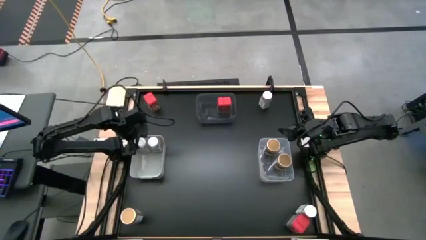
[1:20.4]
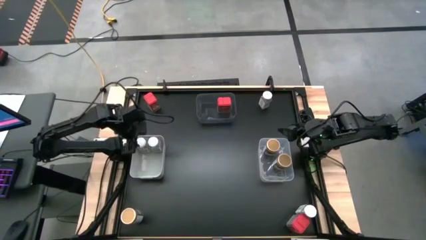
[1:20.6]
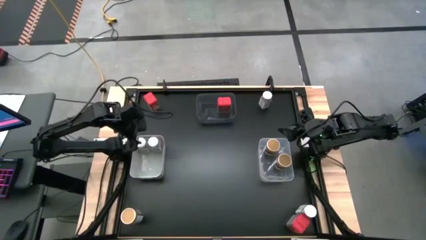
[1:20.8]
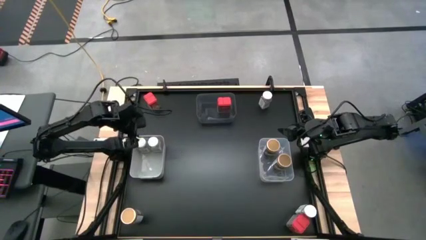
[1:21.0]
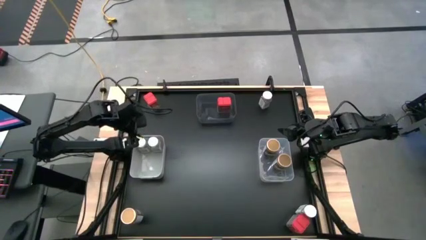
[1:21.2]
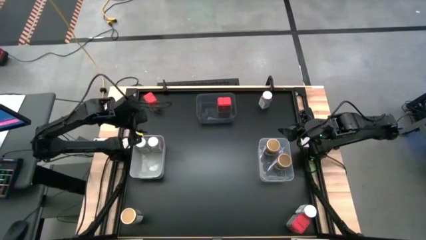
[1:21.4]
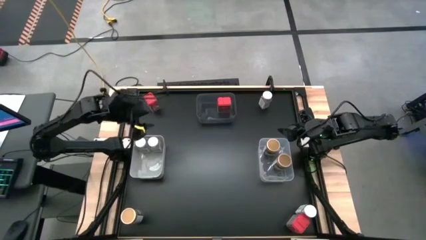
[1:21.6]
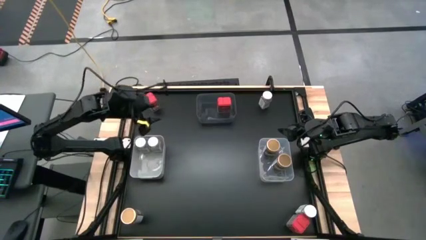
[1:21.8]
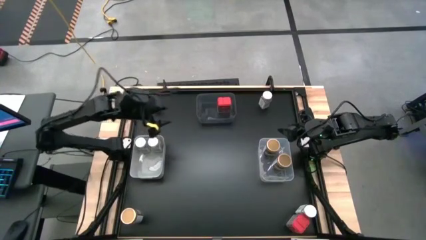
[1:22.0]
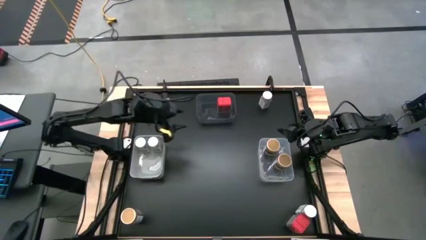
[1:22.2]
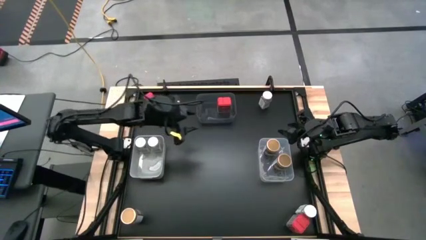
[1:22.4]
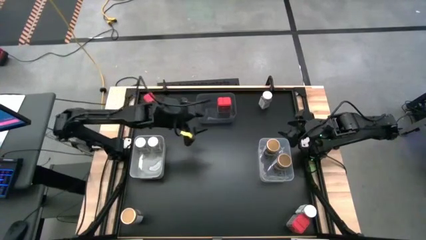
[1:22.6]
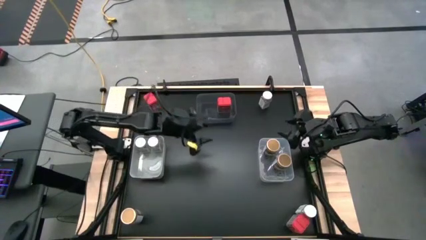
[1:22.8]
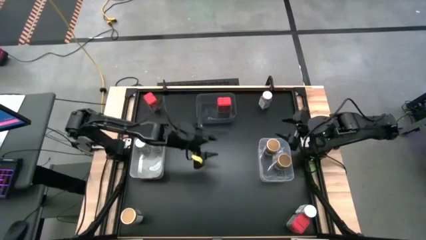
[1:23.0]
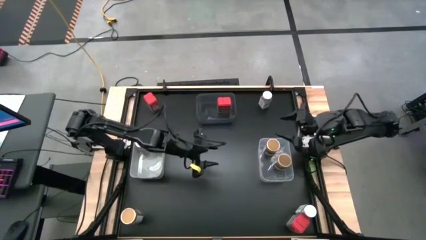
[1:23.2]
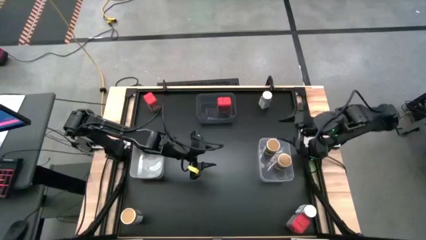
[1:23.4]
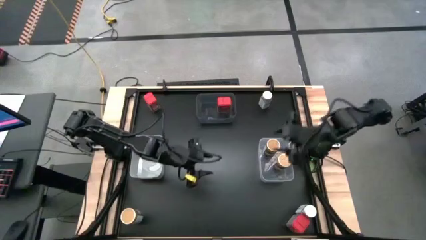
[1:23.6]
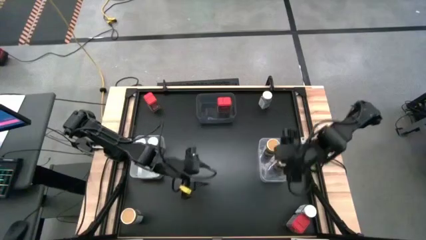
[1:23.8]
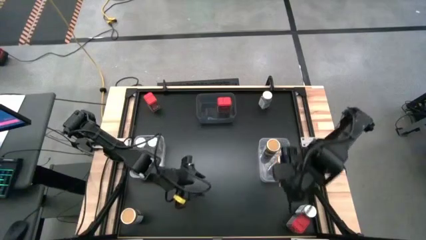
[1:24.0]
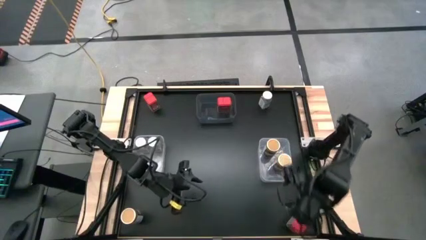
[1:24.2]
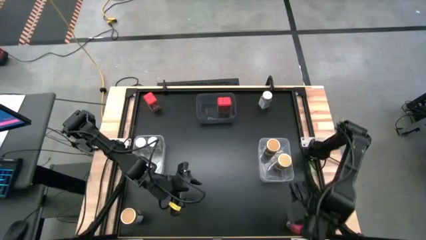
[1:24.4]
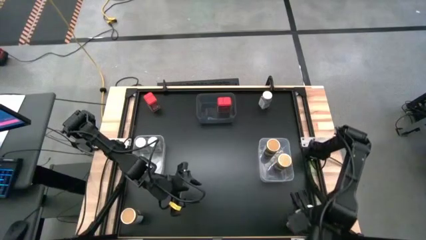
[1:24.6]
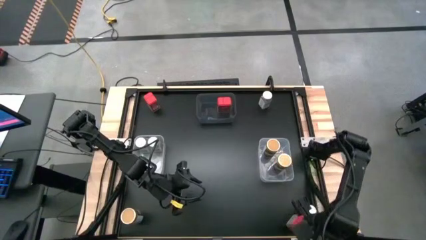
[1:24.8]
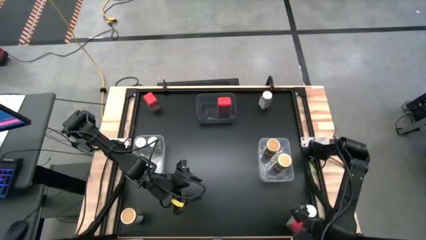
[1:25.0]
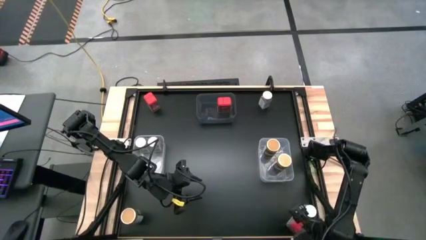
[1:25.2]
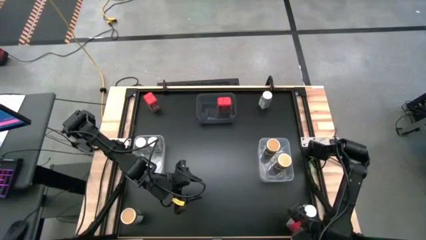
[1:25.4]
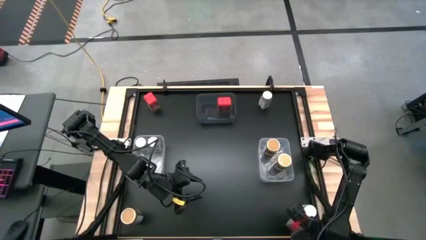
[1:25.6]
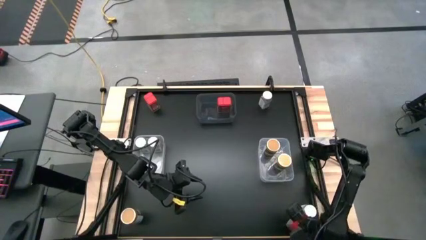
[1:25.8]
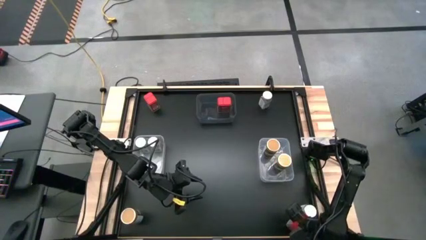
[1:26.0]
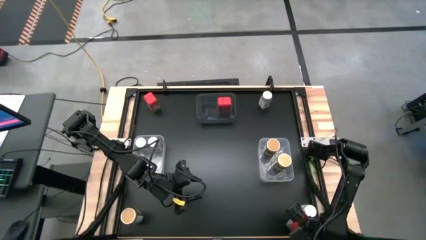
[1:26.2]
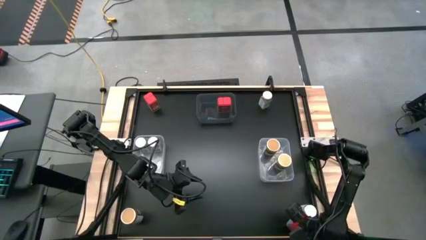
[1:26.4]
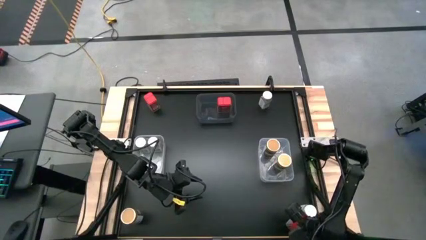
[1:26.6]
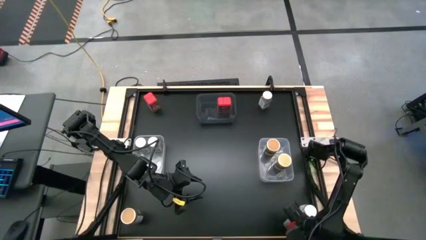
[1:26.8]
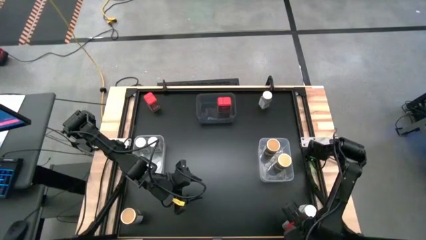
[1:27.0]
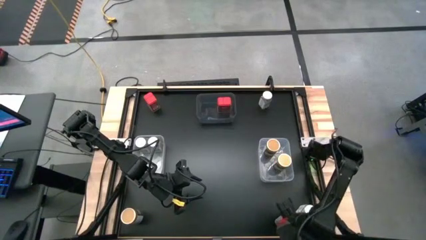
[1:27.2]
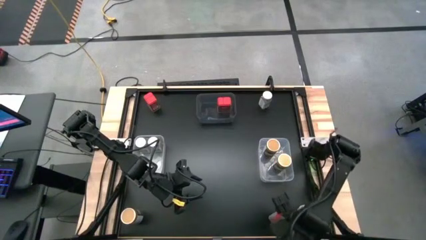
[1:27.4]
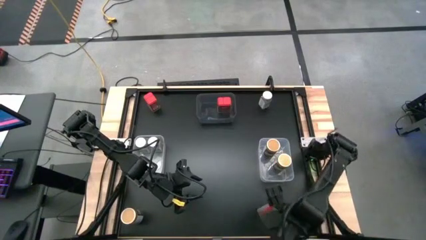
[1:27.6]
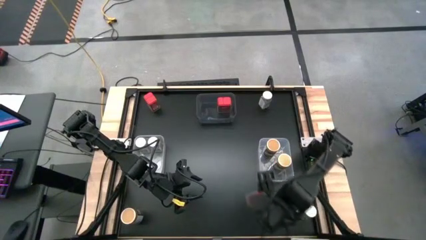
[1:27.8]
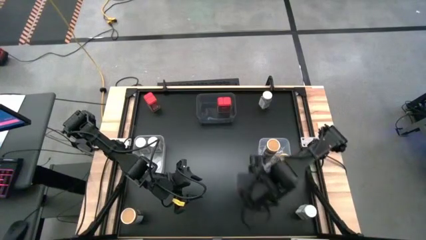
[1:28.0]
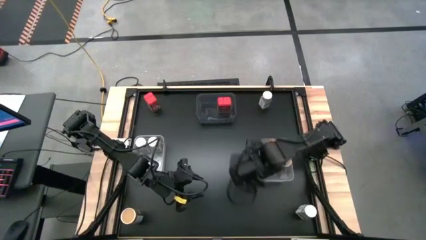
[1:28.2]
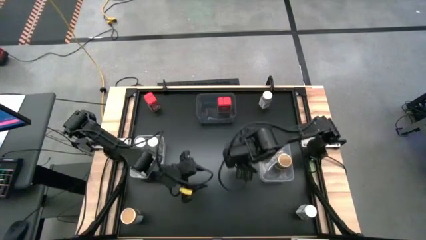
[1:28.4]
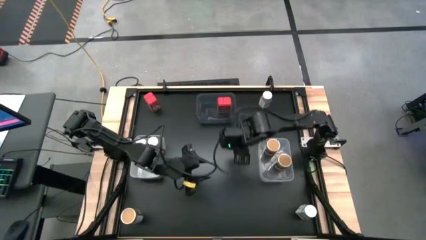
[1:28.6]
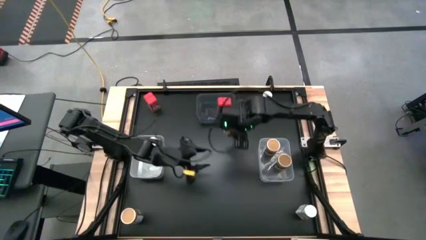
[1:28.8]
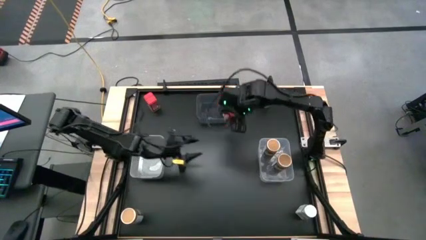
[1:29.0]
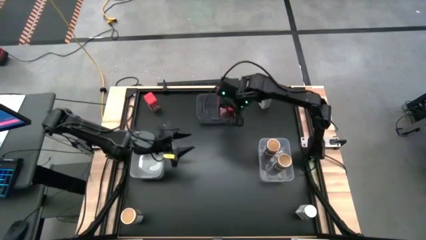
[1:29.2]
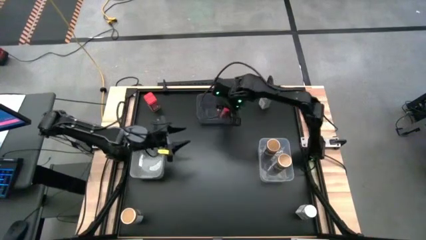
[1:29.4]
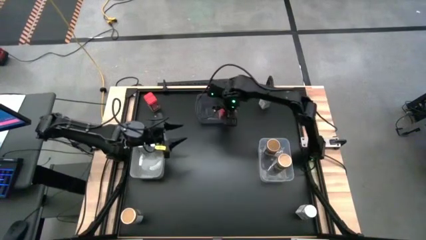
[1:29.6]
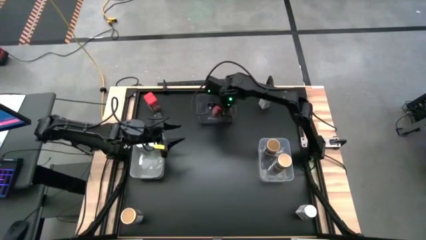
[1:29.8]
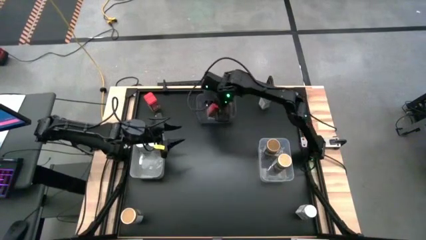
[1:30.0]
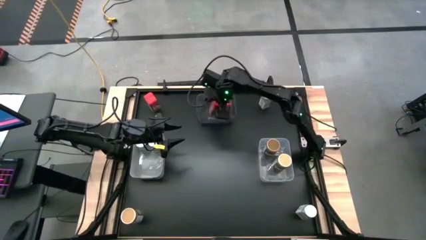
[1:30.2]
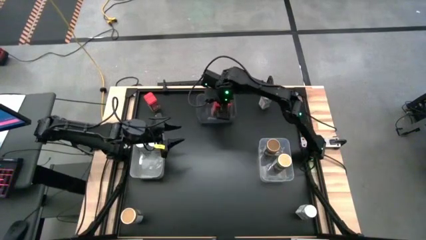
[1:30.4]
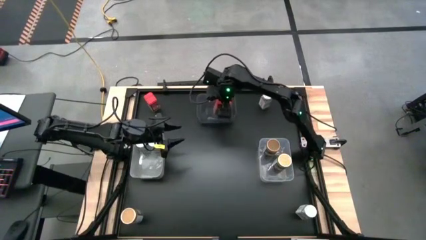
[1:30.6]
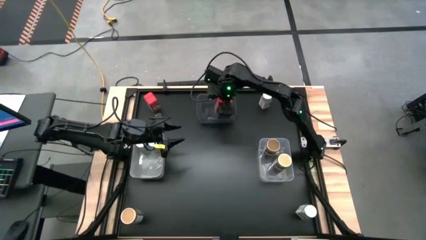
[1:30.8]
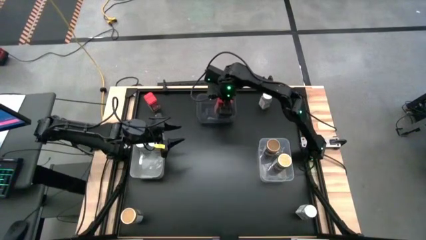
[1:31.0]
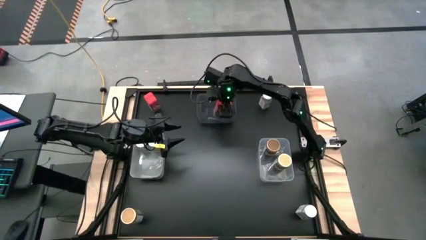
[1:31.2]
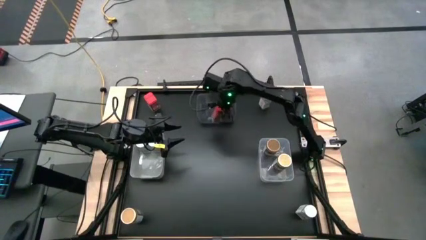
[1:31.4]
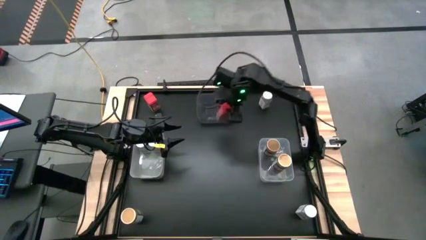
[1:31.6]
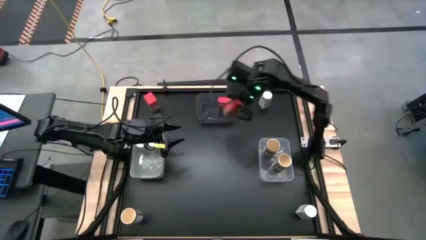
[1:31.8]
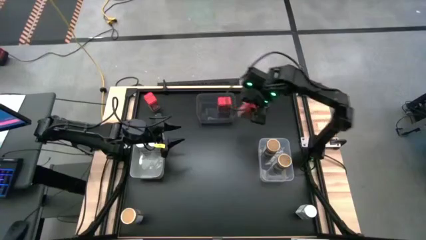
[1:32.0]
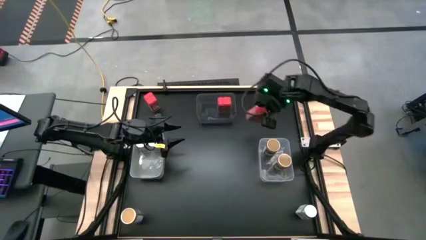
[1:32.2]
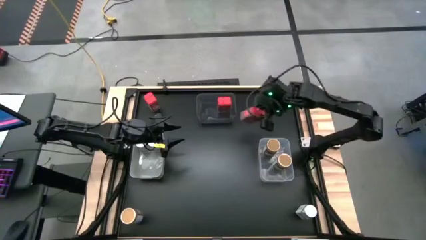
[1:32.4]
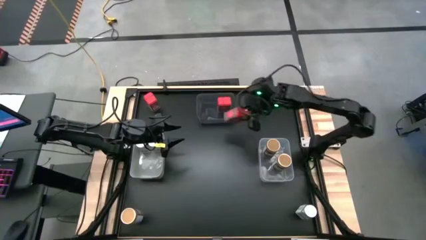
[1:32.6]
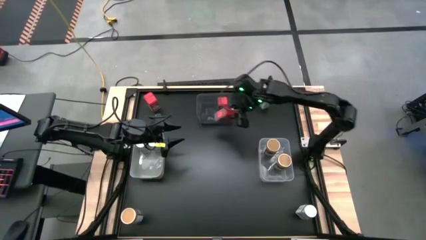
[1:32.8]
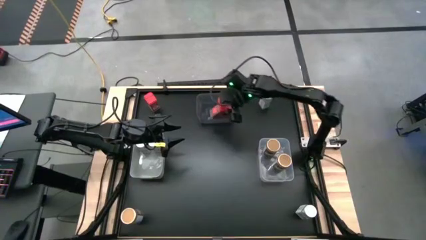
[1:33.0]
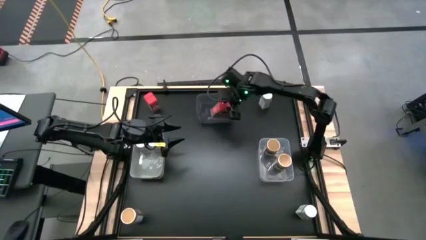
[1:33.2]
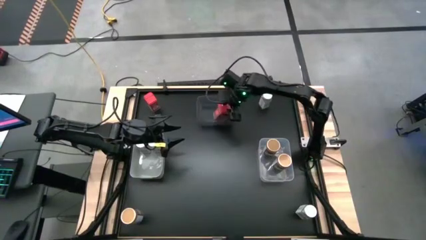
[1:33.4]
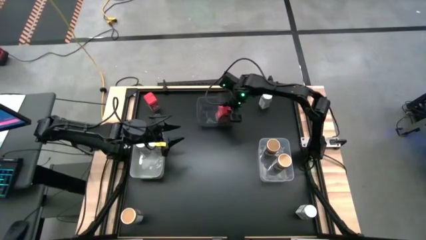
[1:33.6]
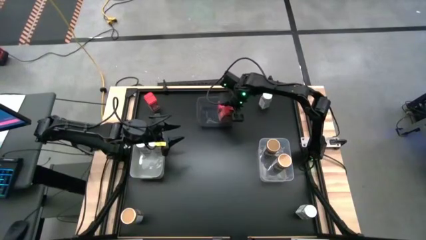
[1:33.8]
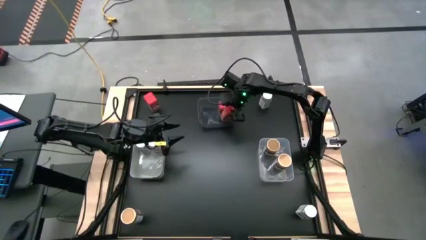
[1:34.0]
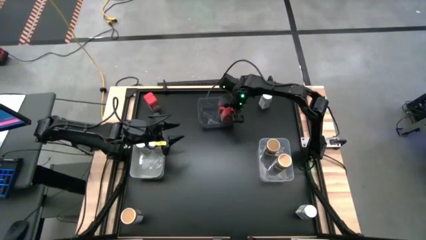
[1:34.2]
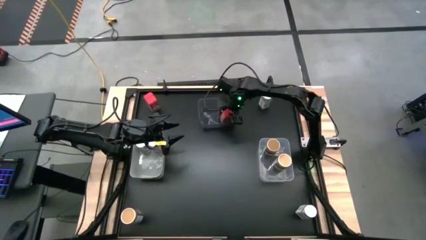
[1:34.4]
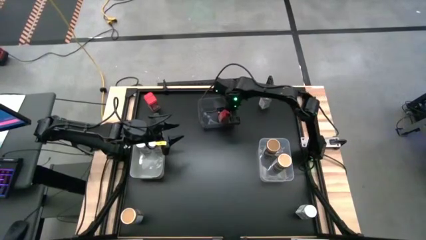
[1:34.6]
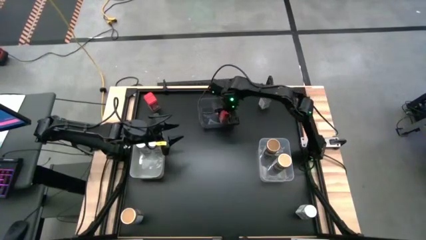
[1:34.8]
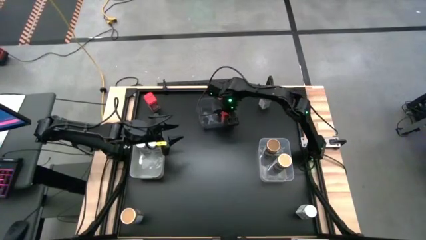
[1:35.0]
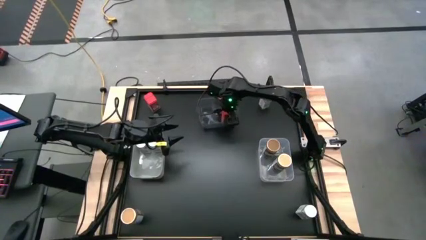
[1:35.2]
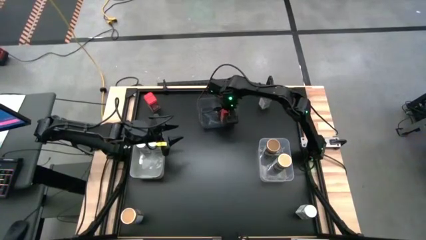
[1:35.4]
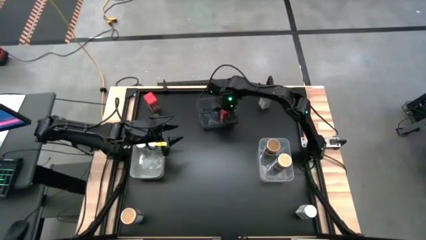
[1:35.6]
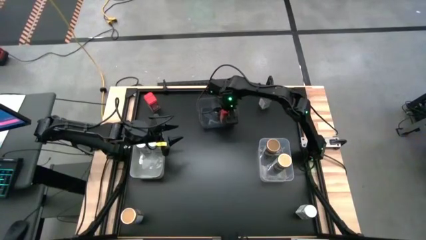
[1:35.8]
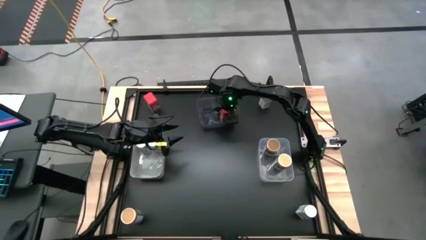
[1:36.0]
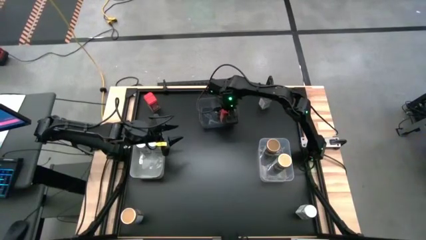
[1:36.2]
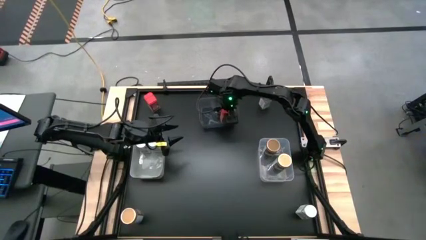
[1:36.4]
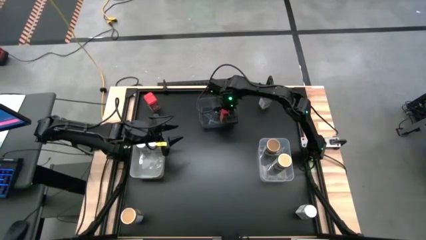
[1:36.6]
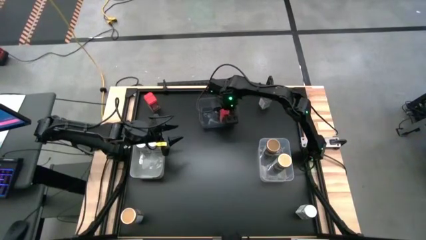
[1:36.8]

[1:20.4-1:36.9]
Task: Sort spices by type
Put the bottom red seasoning can into the black bin
